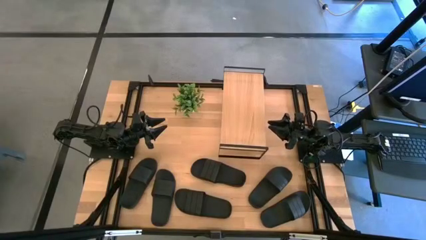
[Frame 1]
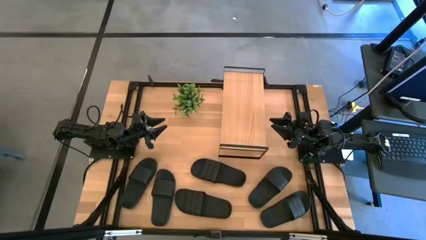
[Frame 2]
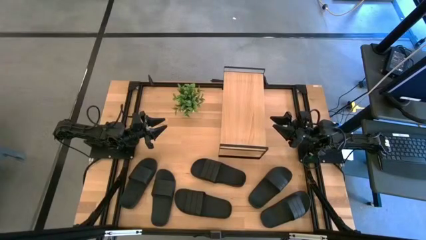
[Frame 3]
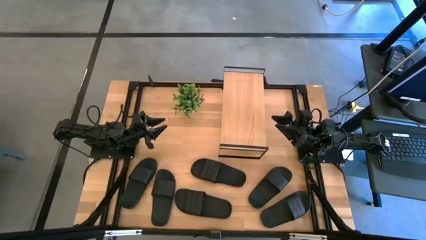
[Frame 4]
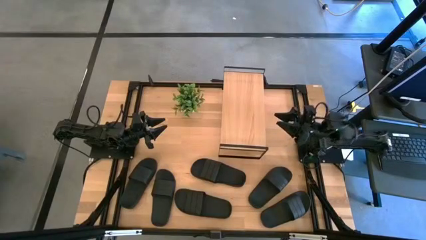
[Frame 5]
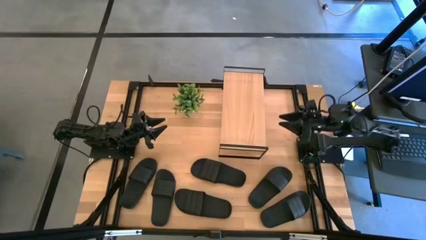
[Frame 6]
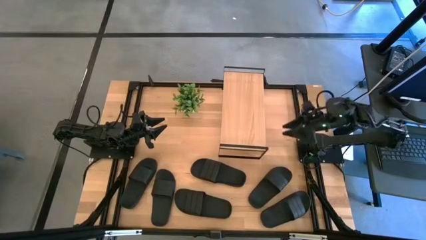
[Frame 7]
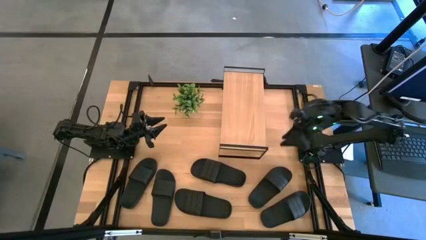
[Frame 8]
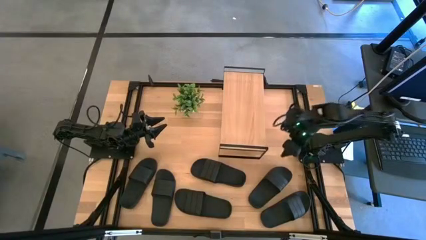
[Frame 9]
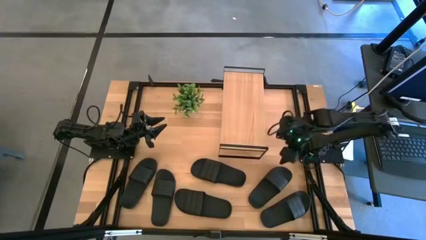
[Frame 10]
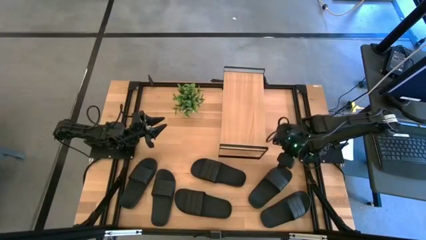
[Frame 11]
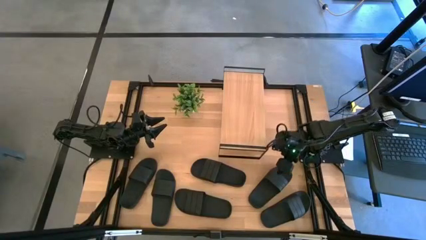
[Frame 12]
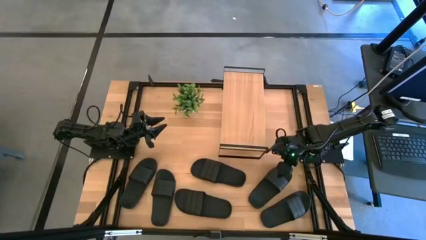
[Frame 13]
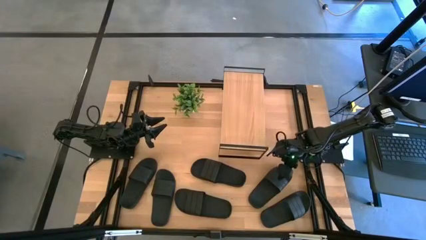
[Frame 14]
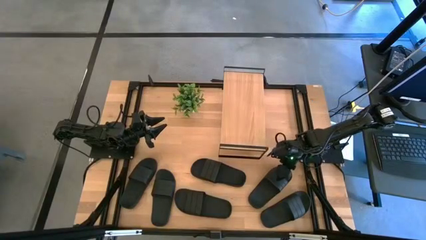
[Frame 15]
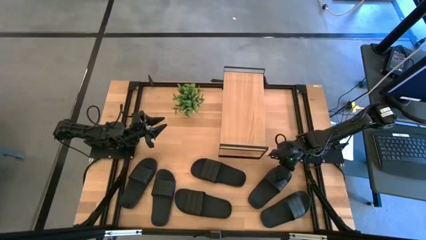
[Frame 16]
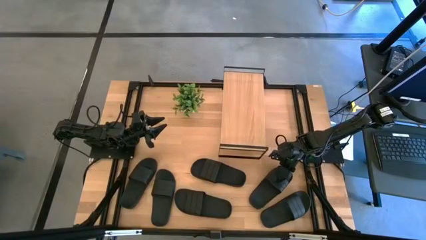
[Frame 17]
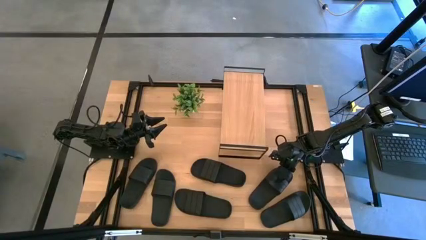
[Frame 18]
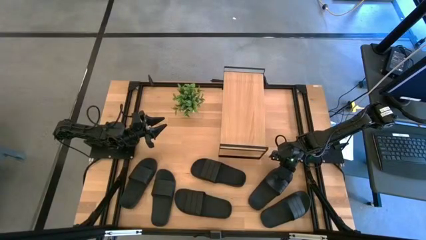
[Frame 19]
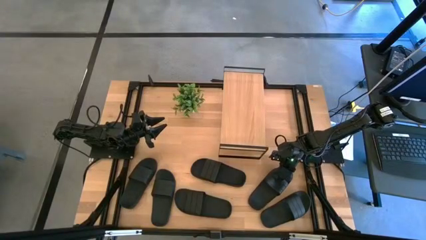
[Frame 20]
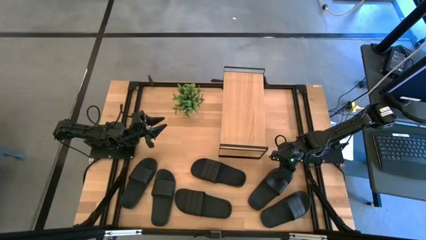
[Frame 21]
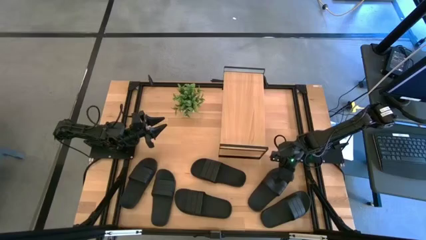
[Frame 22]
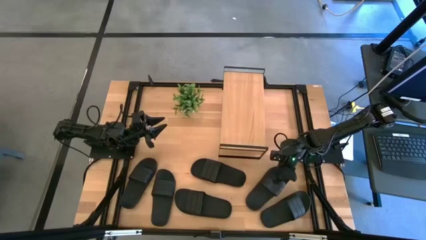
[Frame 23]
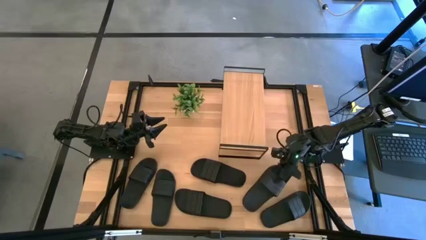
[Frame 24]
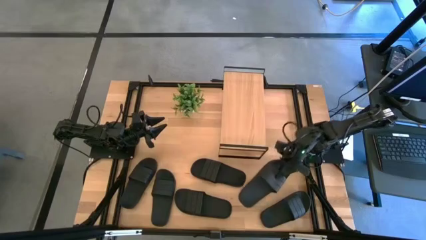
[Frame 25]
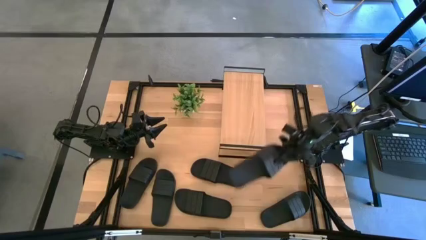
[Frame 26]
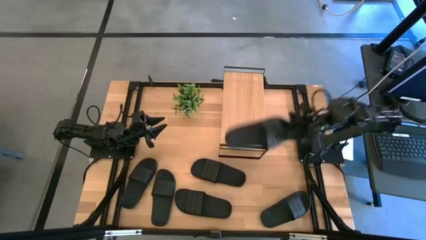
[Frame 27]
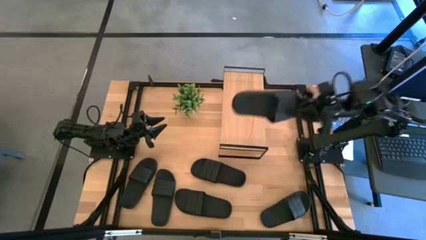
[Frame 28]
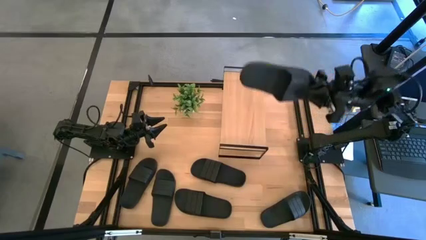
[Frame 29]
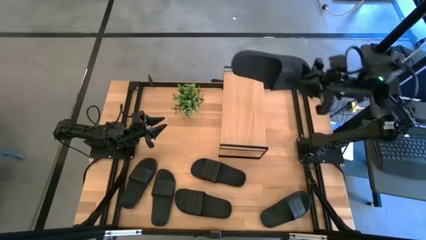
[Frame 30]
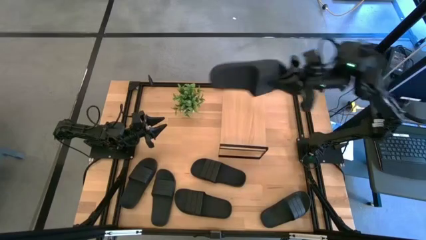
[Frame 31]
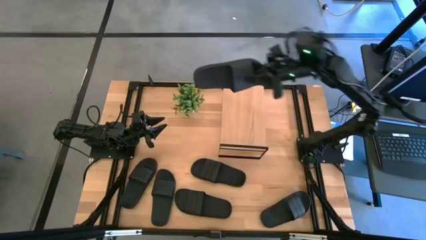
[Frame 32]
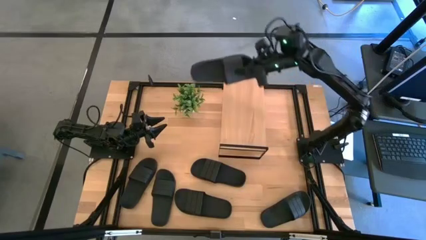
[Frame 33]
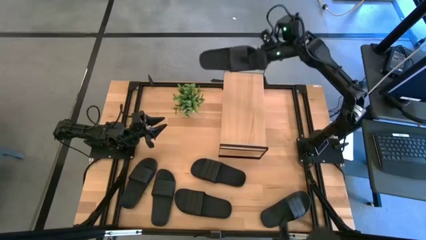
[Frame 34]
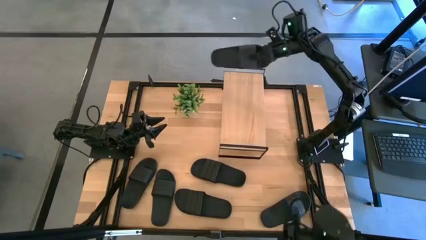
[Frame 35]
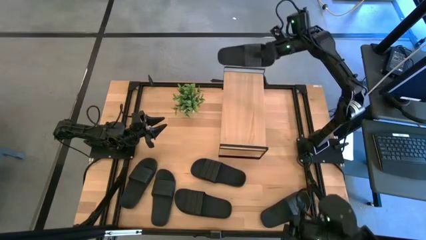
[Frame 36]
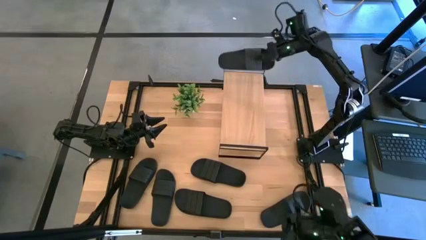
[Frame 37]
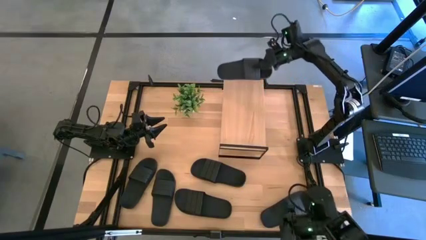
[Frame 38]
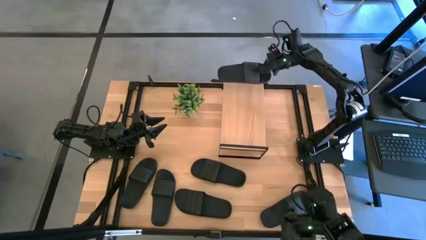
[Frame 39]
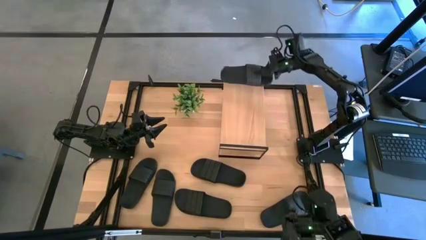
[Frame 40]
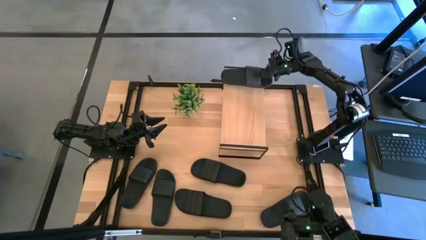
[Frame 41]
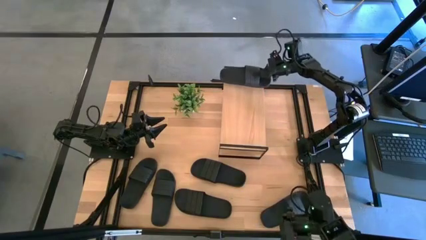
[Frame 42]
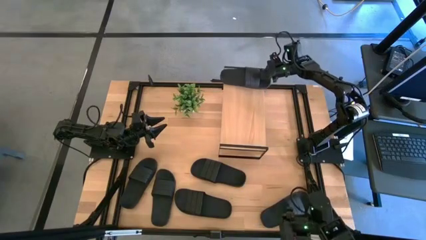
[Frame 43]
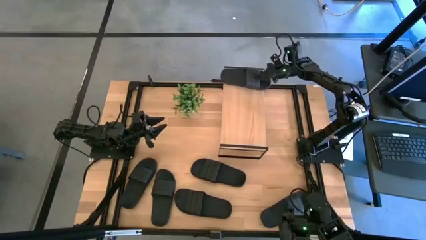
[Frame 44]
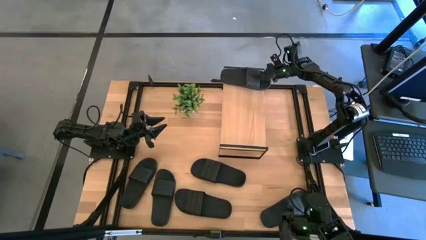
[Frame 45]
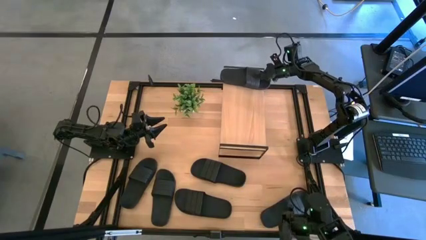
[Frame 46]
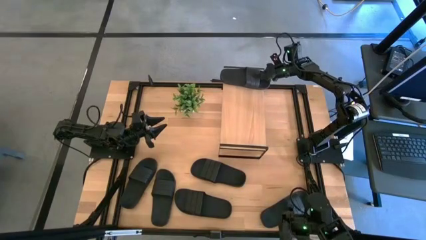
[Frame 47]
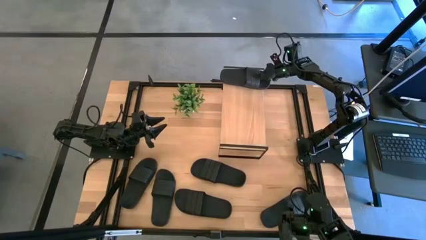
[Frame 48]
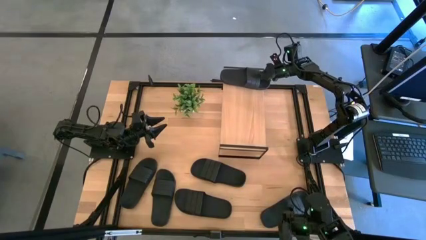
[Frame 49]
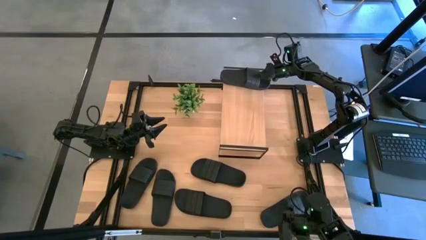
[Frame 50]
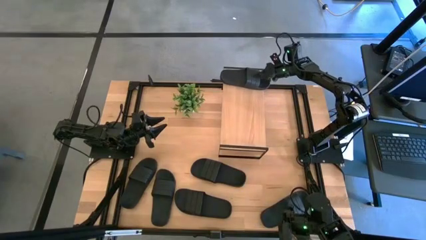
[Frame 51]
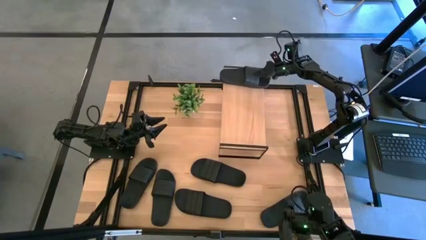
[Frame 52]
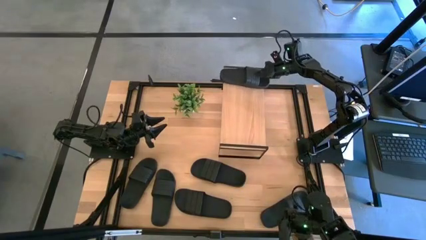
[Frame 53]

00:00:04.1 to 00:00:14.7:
Task: Pick and place slides into the shelf
Put the black slide on the shelf
